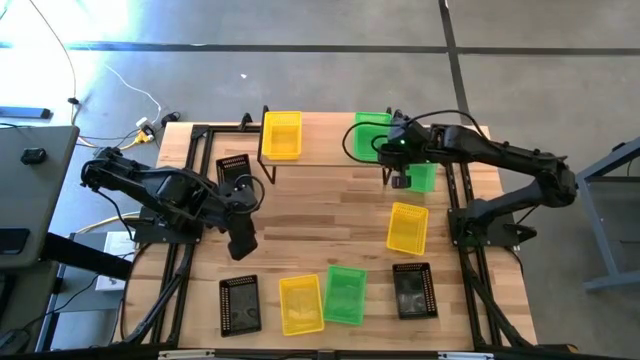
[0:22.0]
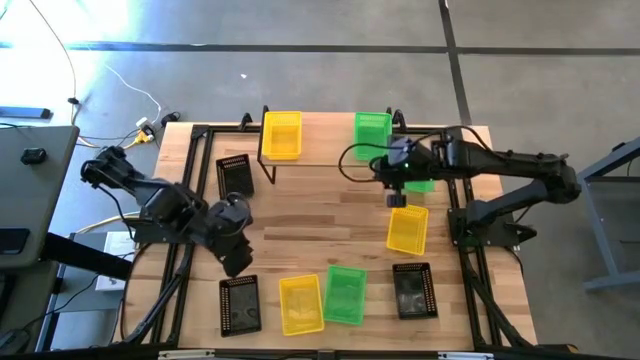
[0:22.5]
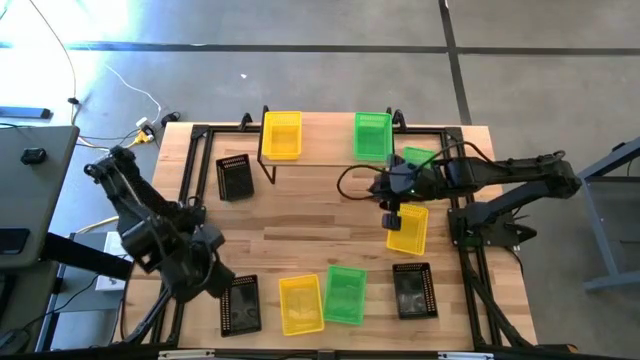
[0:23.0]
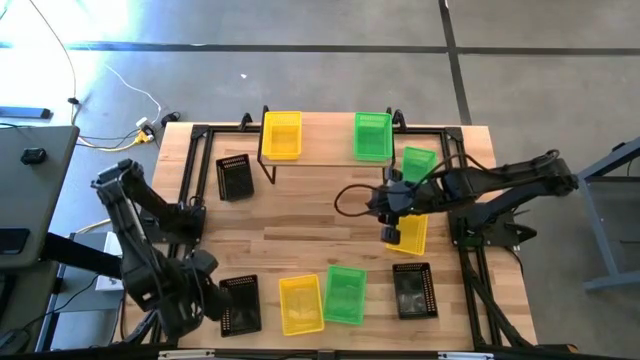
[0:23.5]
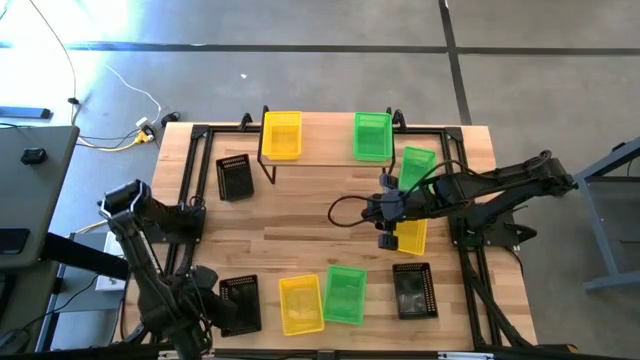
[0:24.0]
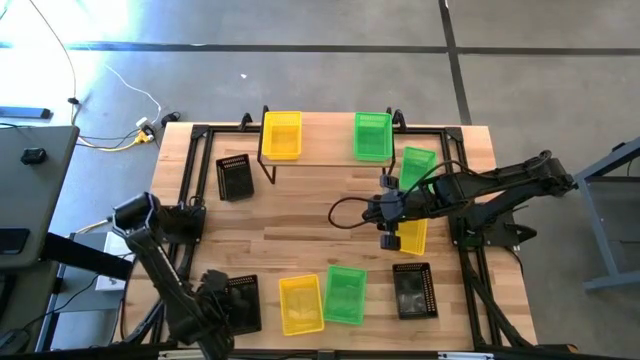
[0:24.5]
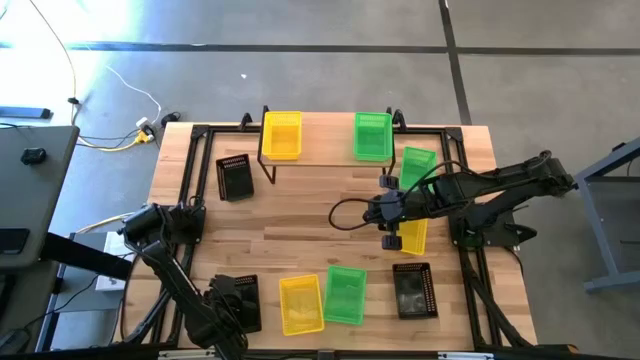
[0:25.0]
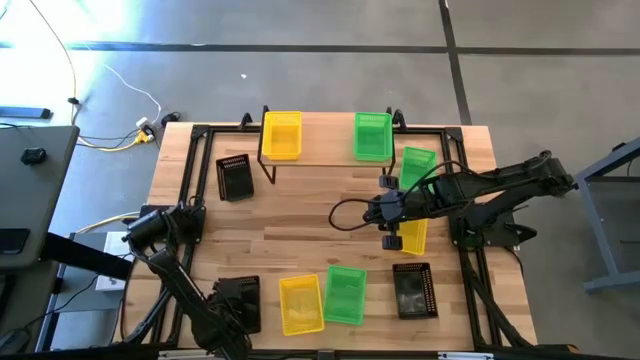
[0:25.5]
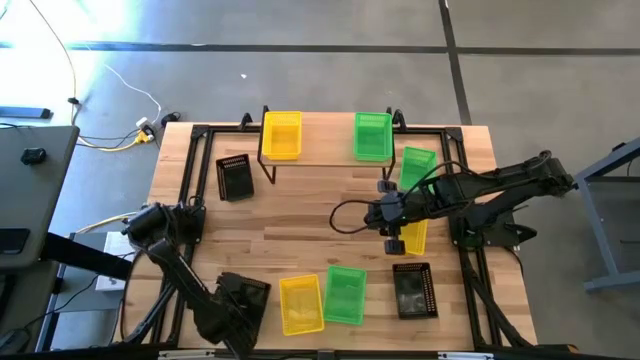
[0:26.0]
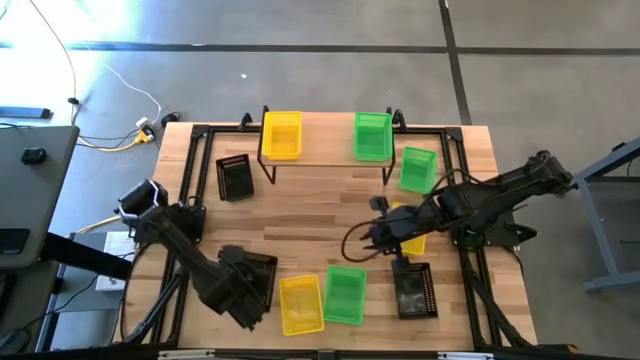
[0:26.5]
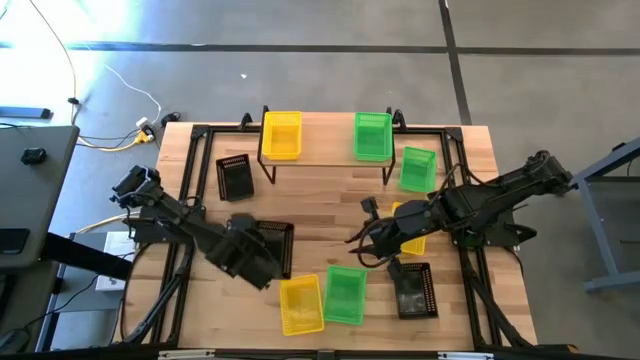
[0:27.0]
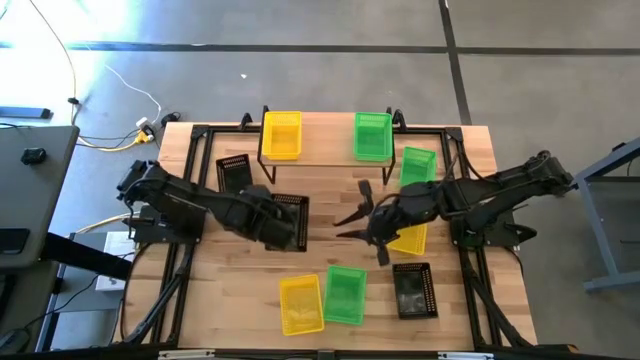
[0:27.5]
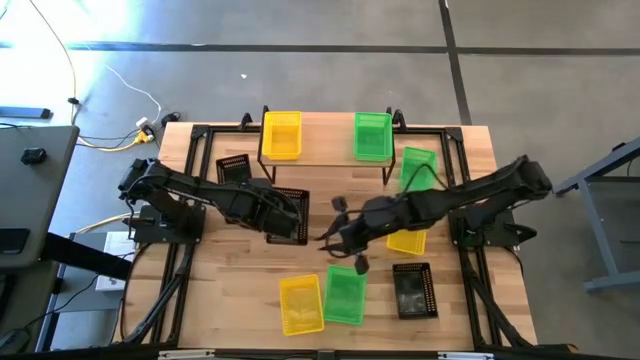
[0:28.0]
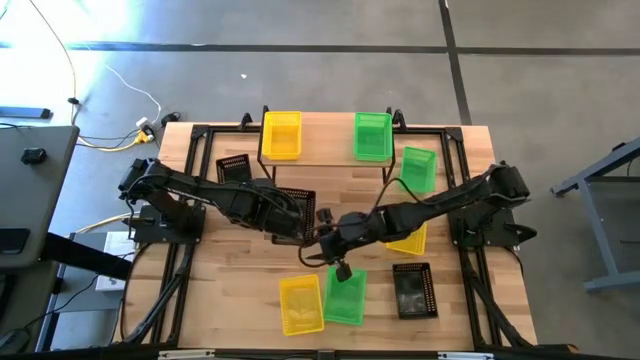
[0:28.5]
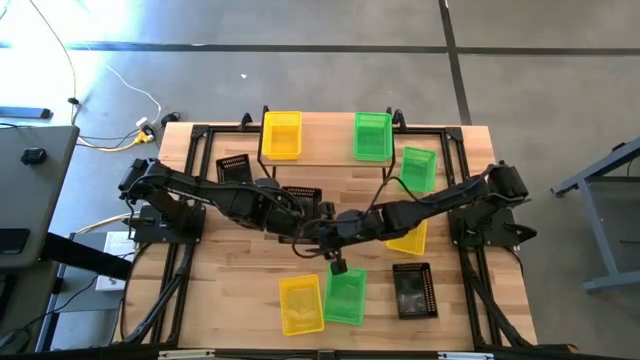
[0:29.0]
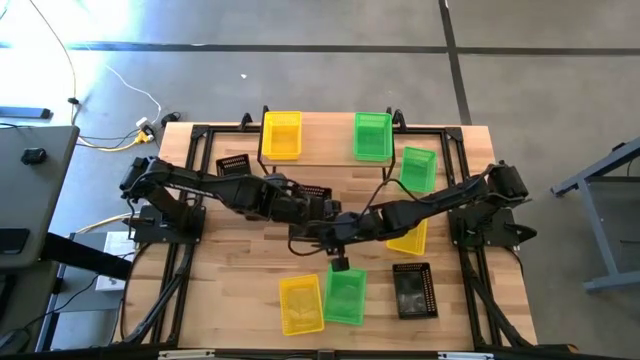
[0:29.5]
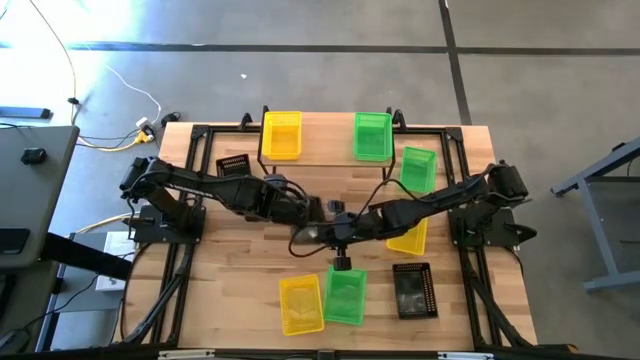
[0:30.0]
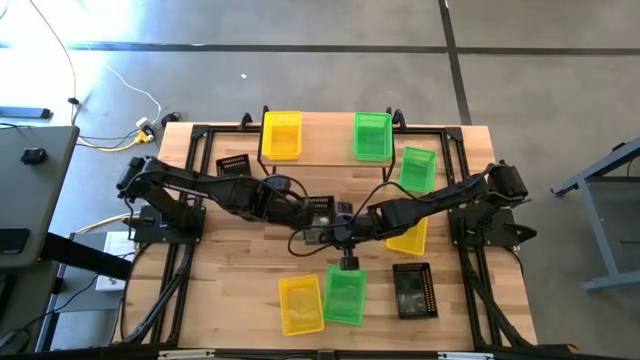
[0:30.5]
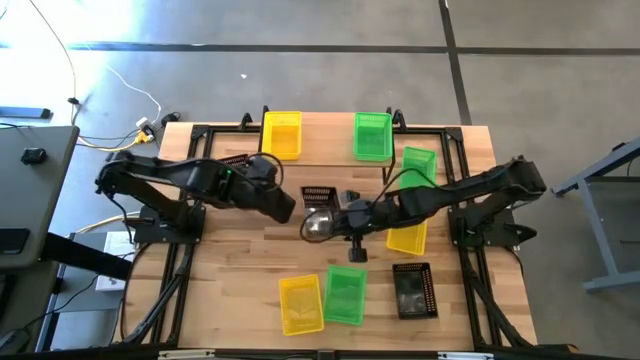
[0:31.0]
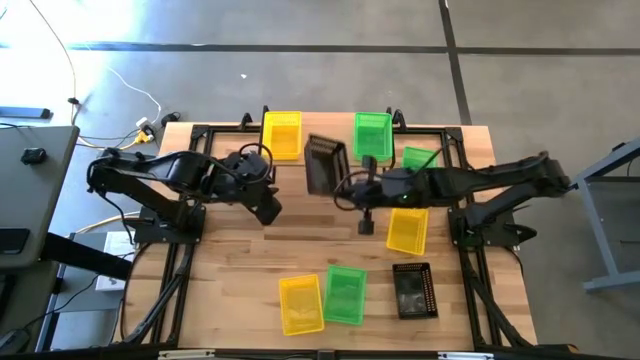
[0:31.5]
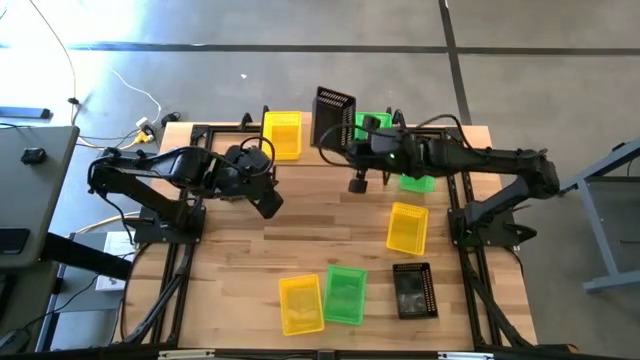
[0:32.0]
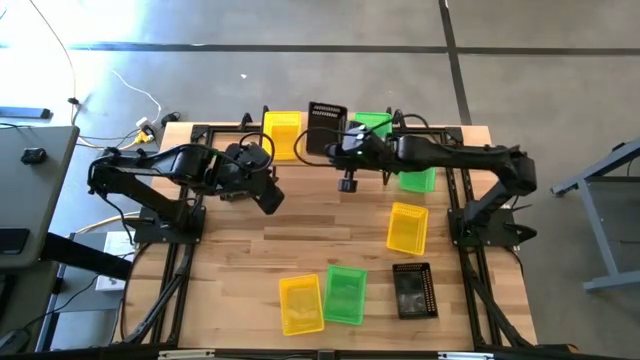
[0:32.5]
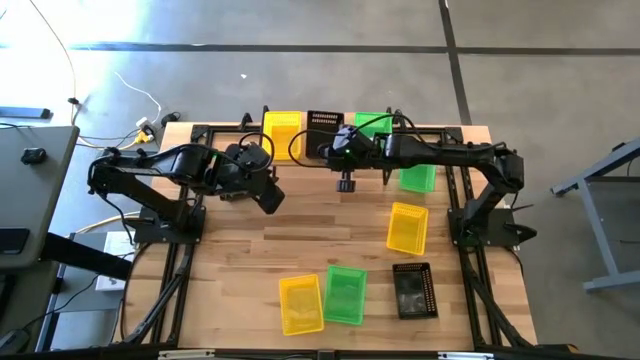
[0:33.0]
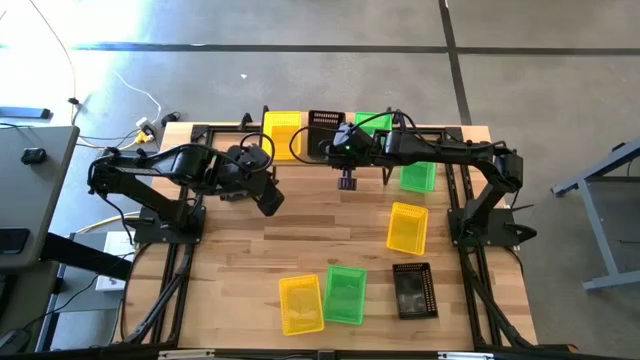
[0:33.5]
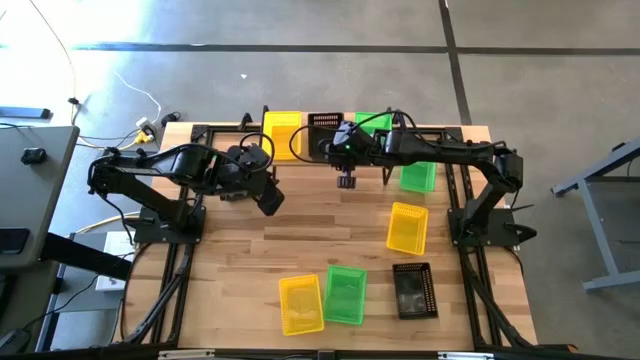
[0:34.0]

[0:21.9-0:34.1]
Task: Stack baskets on shelf by color
Put the bottom left black bin on the shelf

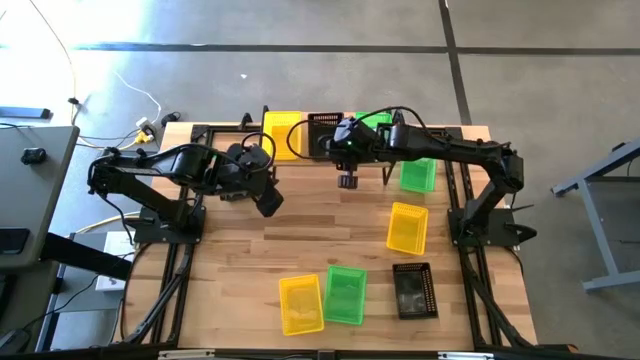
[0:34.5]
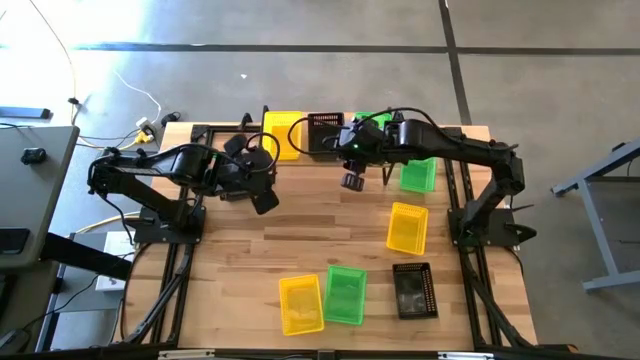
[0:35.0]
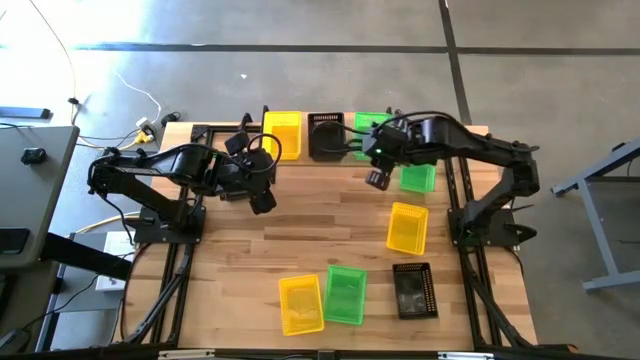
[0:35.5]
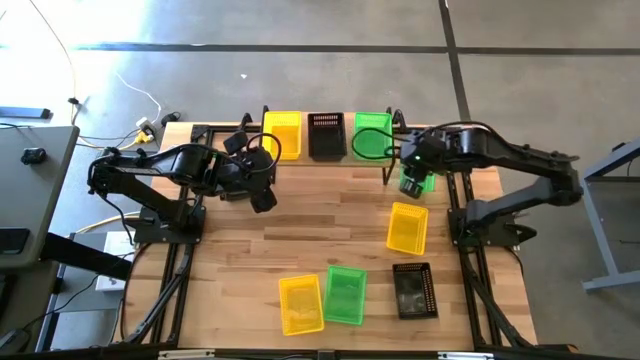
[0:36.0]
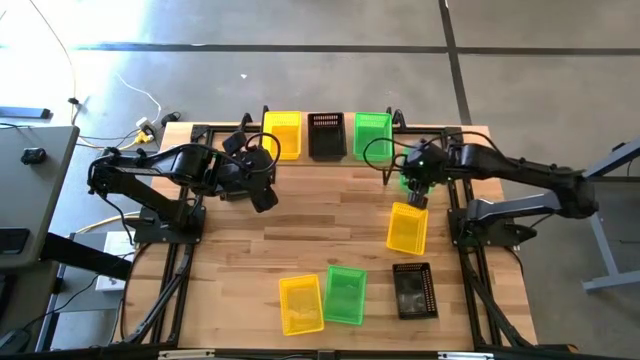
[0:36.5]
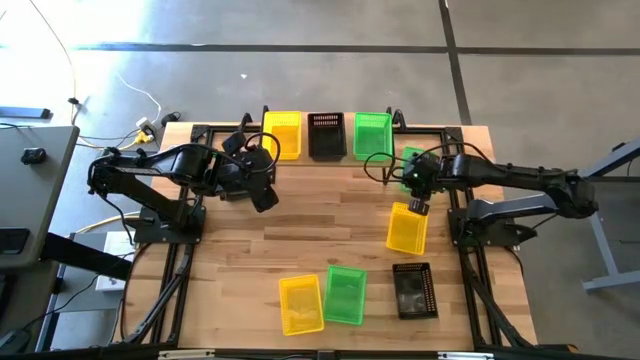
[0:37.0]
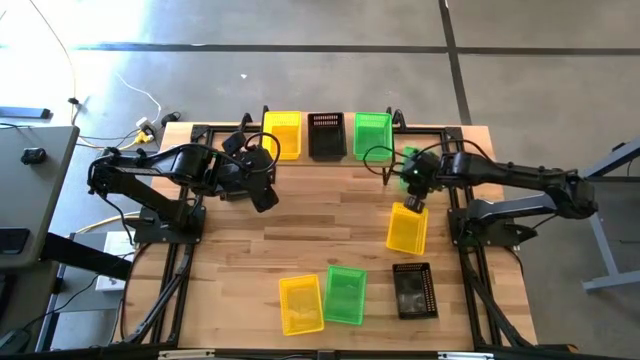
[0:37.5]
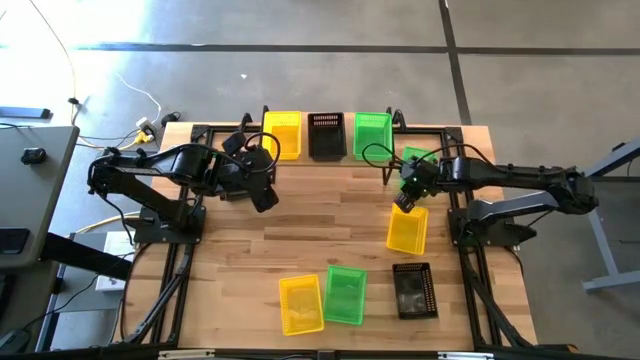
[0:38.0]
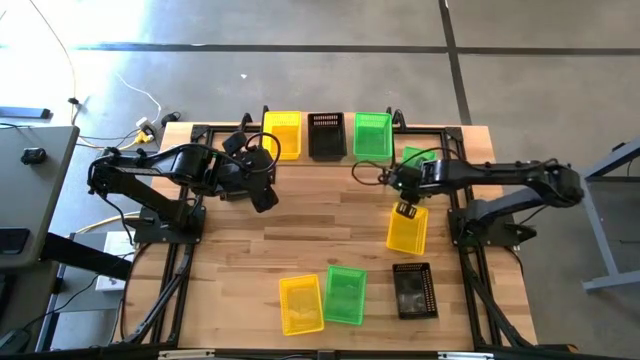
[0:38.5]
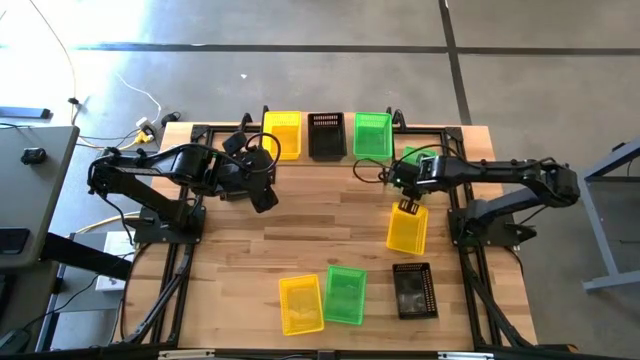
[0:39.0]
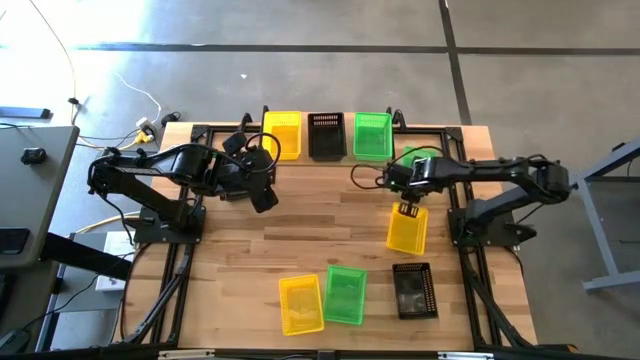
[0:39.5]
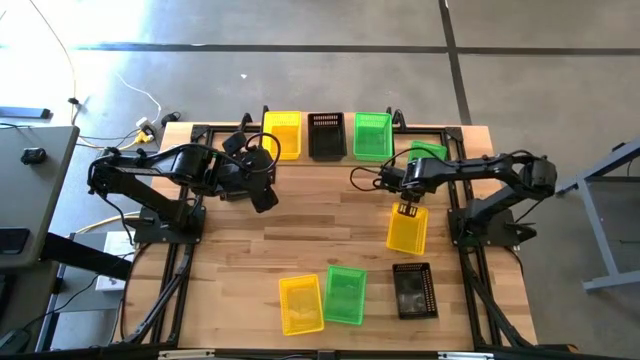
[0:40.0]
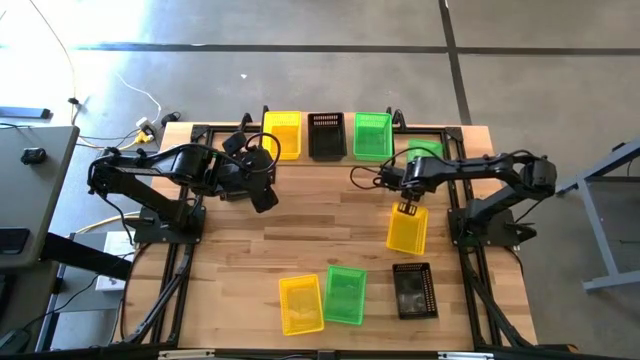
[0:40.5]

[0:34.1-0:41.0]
Stack the top green bin on the green bin on the shelf
